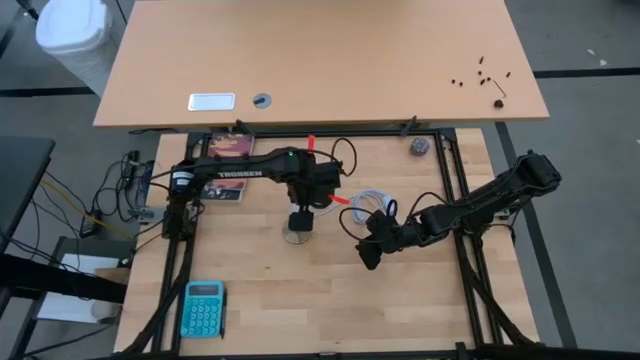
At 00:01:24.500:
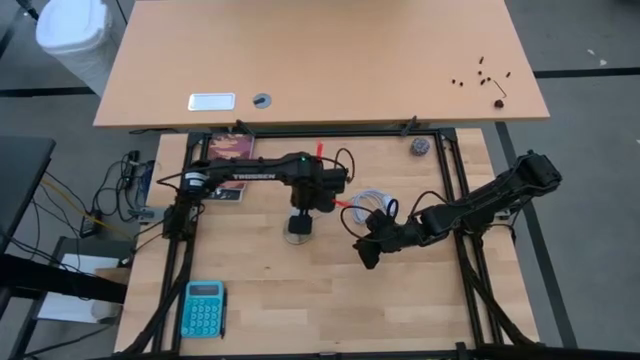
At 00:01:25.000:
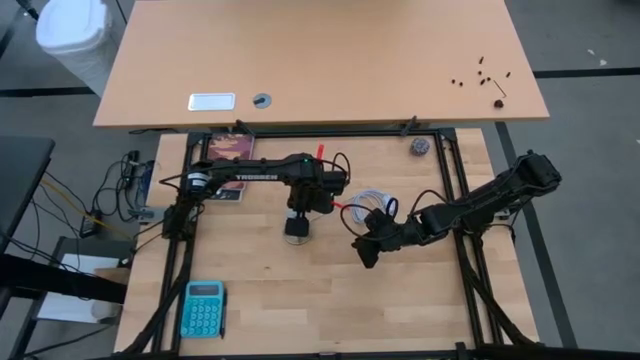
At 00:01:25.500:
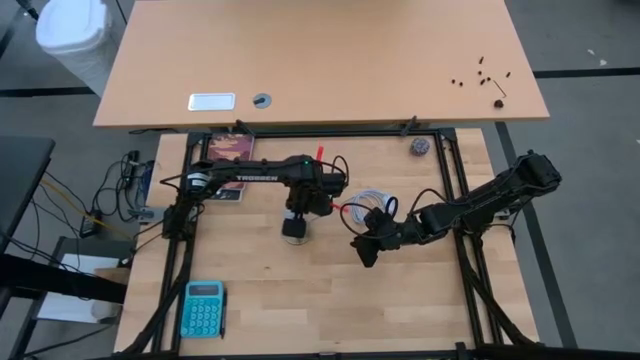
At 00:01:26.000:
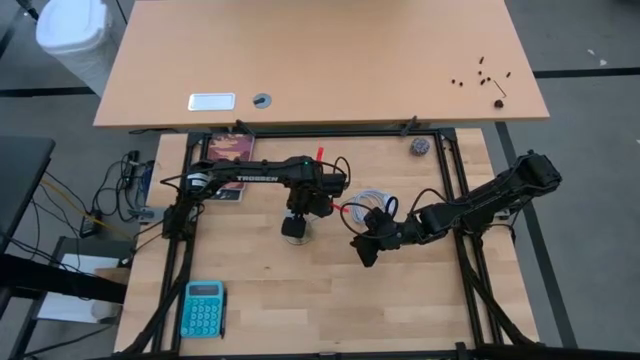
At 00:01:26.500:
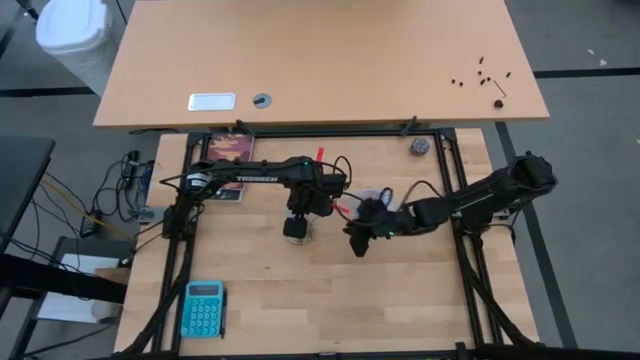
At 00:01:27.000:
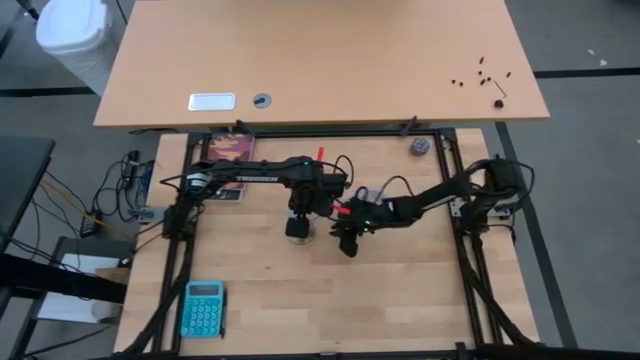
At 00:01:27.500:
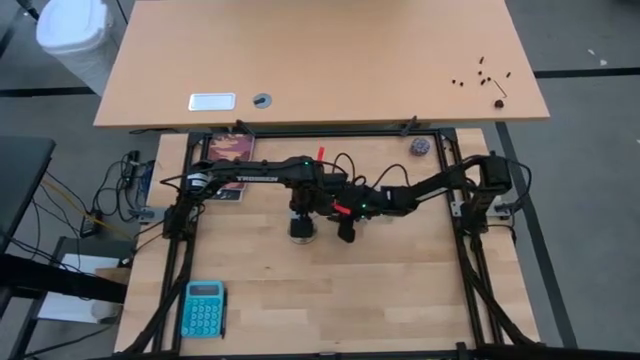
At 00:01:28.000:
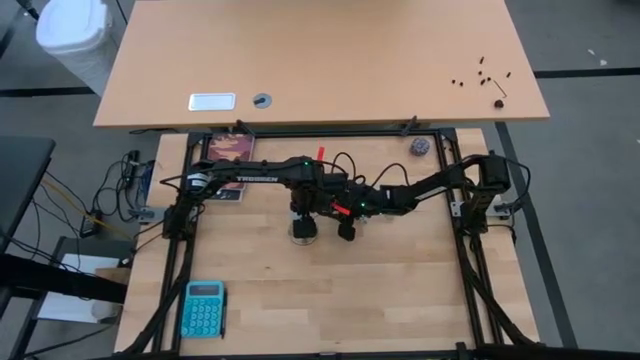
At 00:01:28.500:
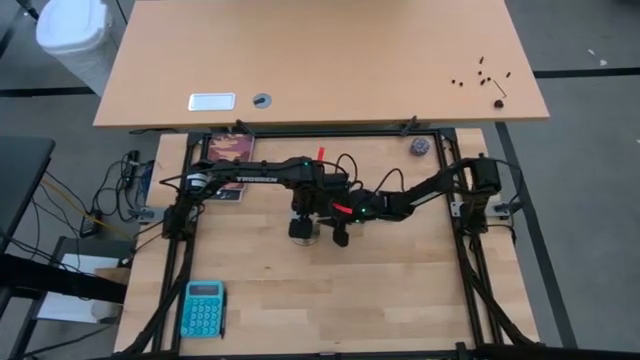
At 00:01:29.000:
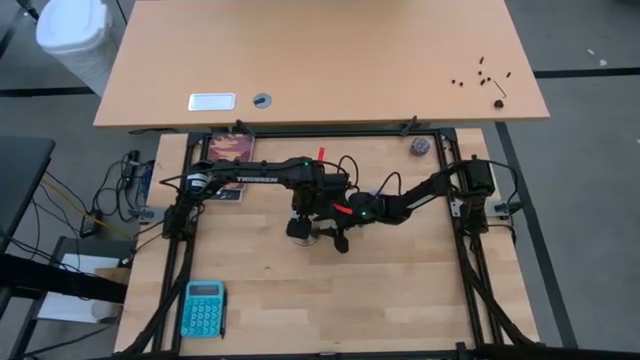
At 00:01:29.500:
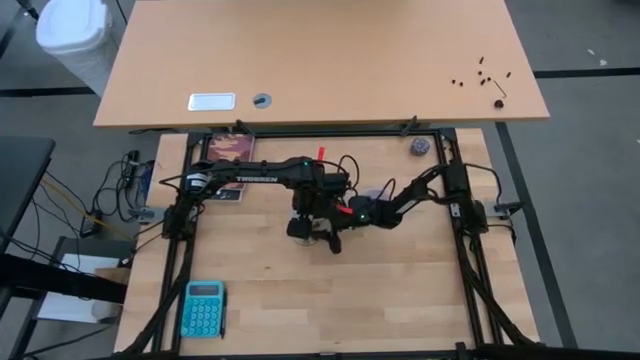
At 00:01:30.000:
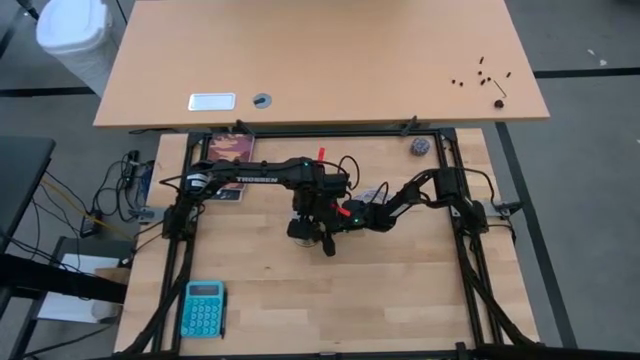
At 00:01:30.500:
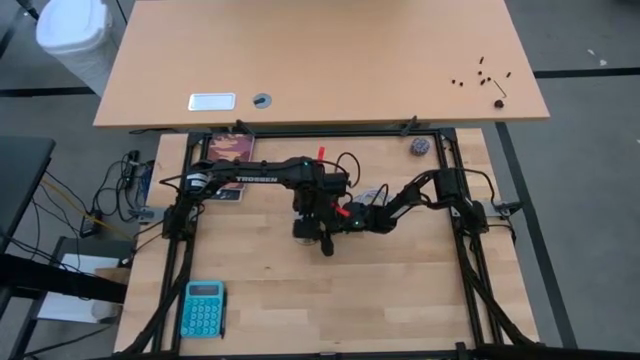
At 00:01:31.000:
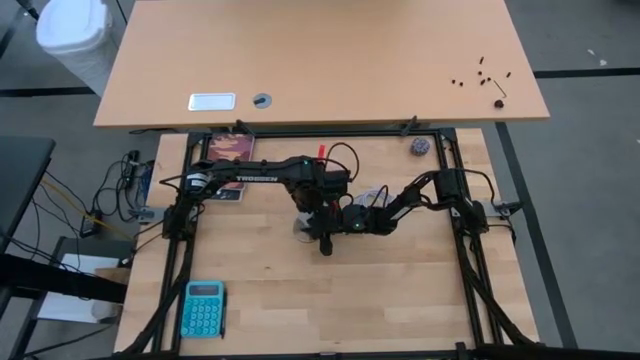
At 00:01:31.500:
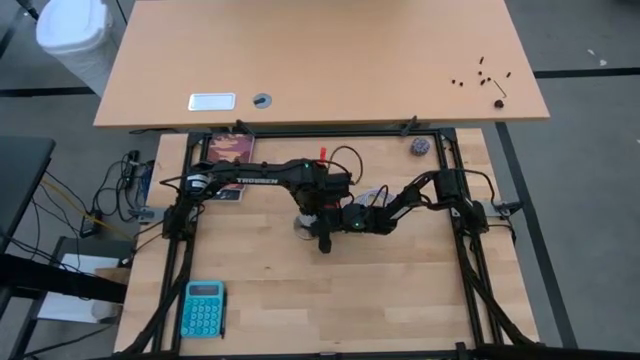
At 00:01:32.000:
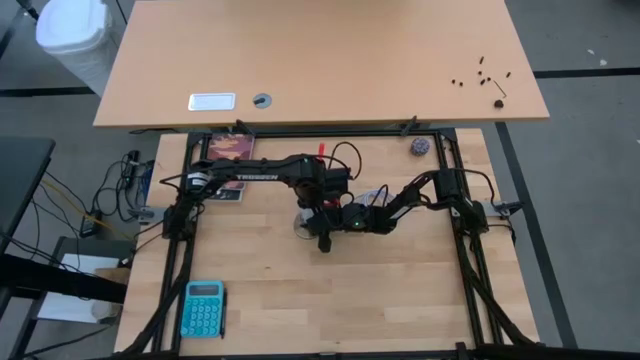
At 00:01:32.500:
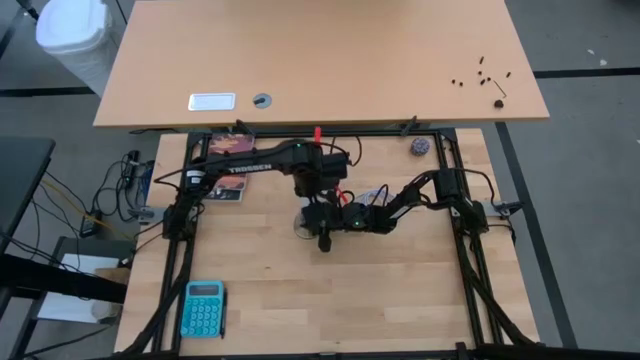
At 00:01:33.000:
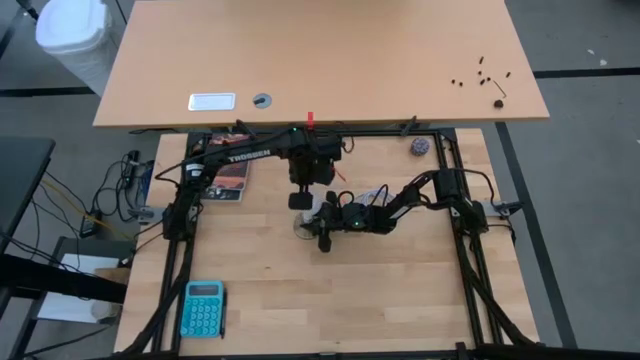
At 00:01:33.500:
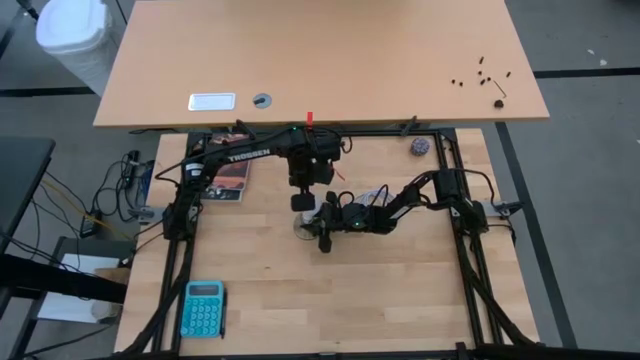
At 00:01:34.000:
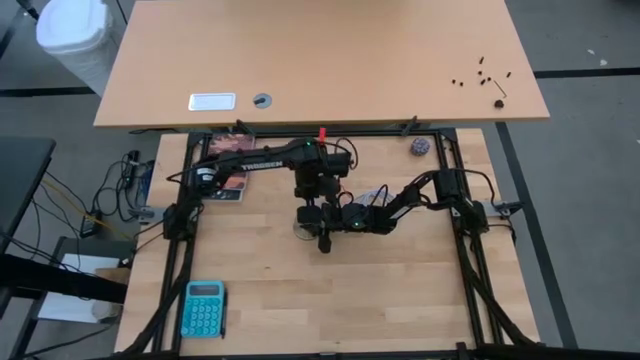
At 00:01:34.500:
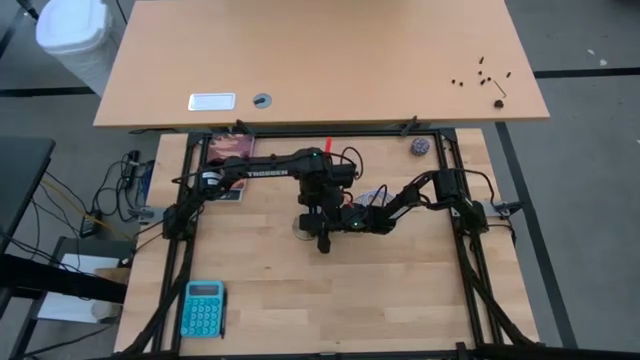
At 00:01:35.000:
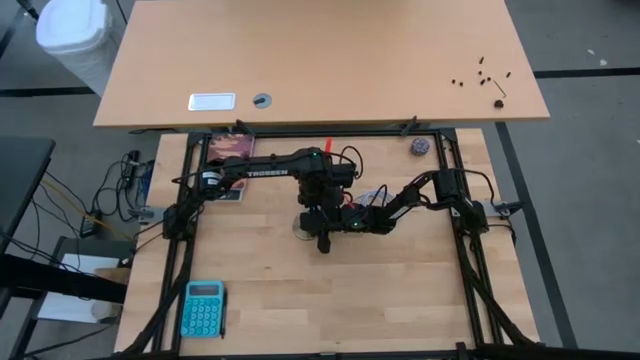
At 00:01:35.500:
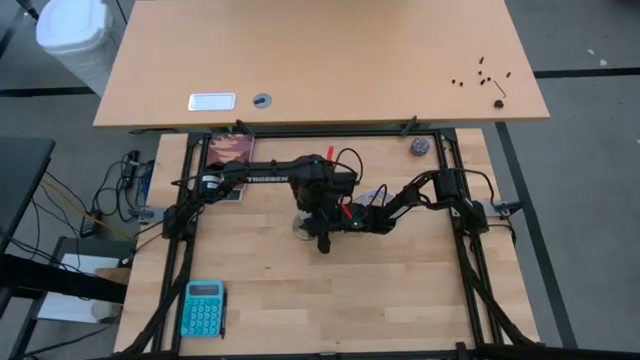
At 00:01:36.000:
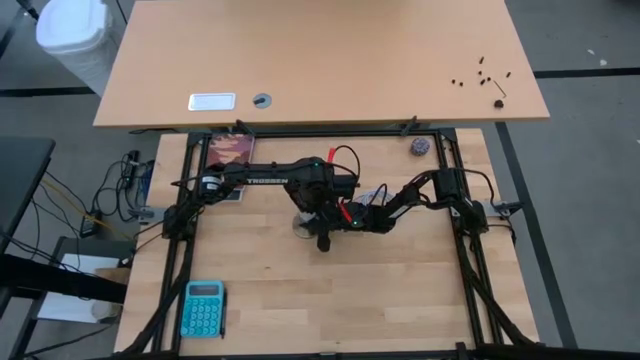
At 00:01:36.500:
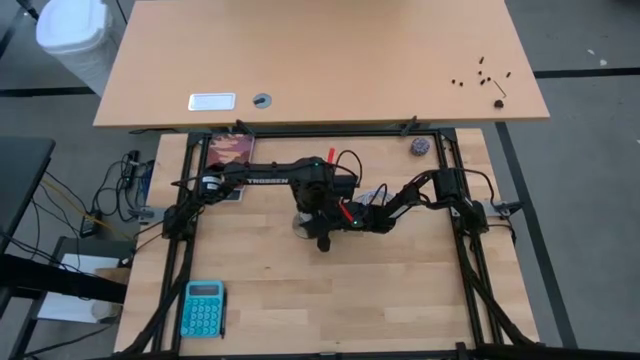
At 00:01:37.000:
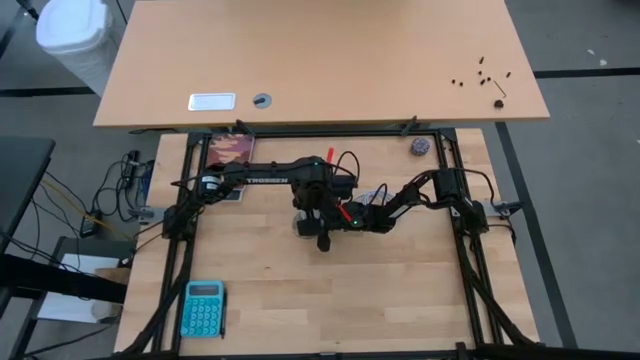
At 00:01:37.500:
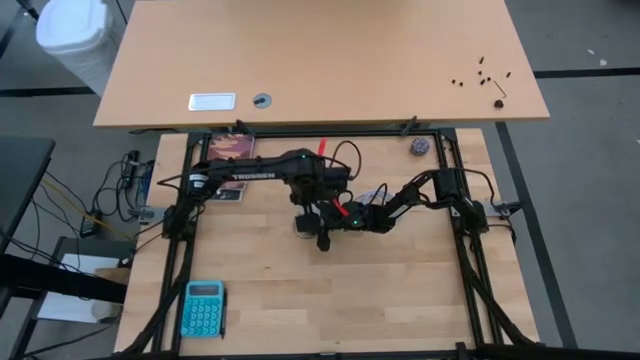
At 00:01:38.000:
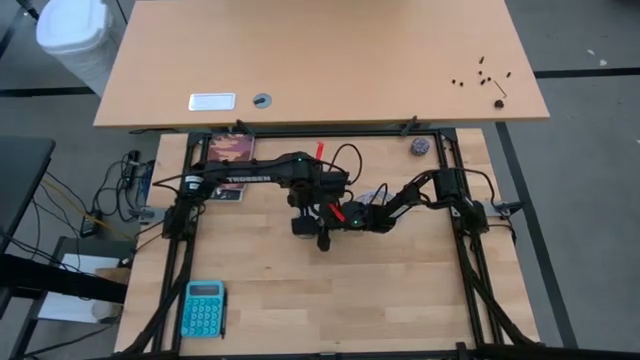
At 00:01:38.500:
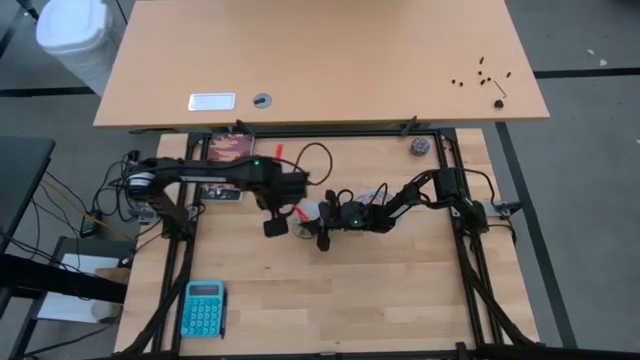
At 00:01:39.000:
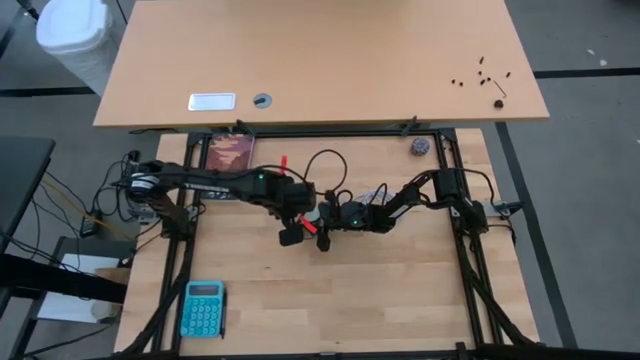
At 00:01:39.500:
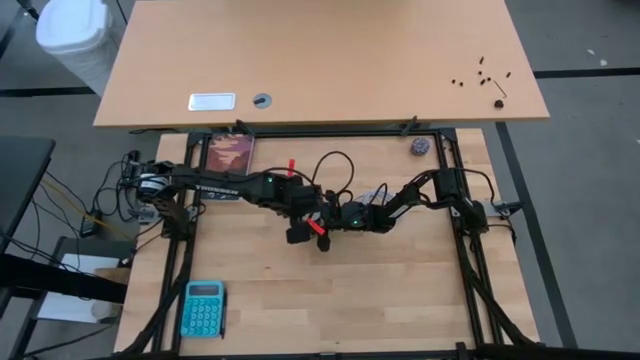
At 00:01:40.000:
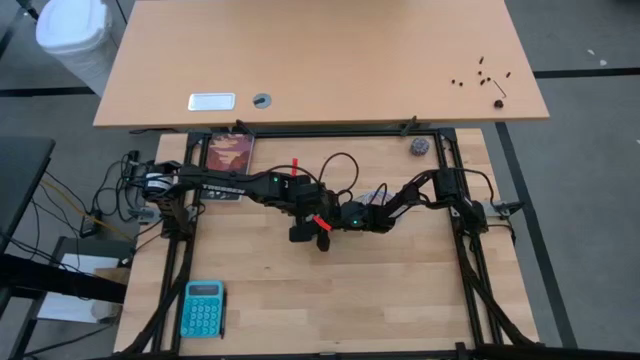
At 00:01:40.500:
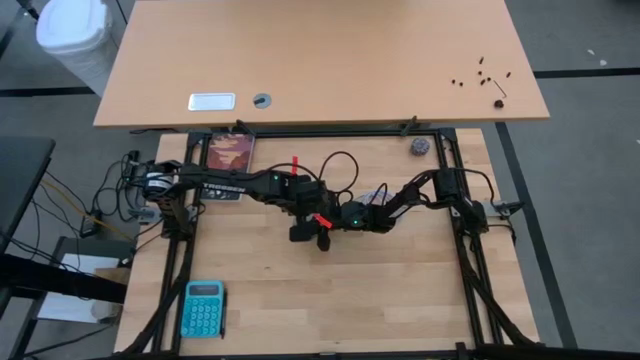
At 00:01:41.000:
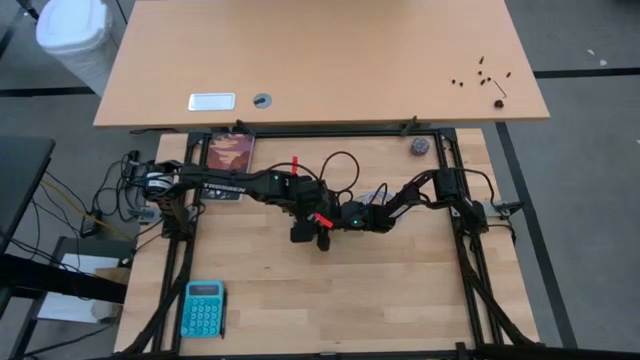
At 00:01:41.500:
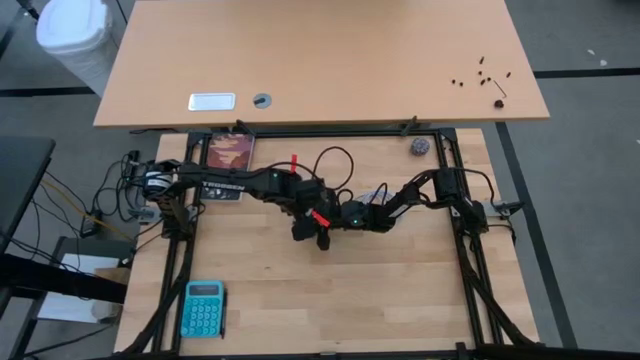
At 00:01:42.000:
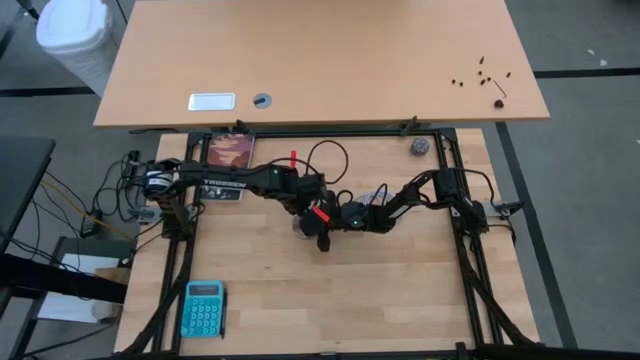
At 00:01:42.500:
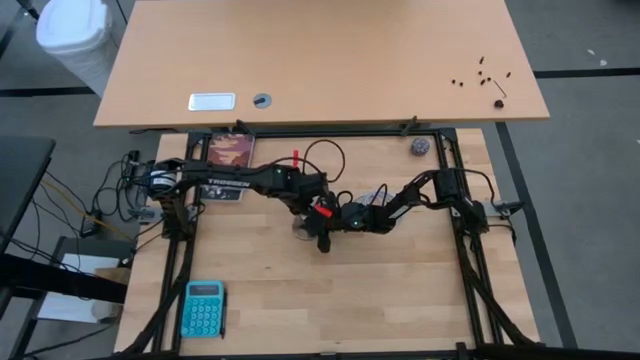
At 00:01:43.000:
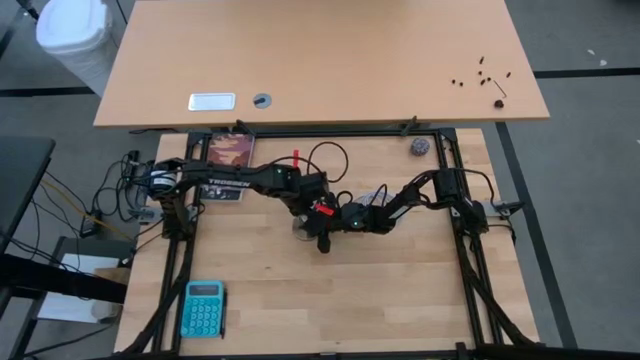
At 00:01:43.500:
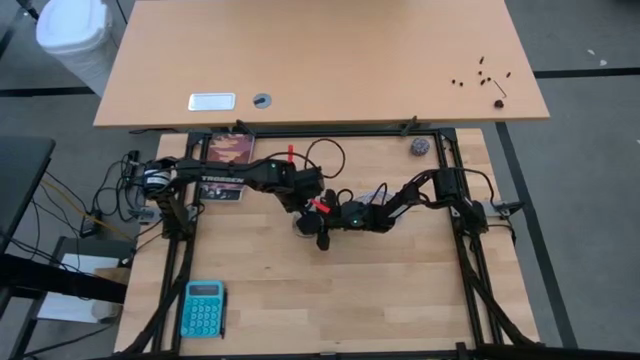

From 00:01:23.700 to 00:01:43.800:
Task: Screw lightbulb
Insert the lightbulb into the desk lamp

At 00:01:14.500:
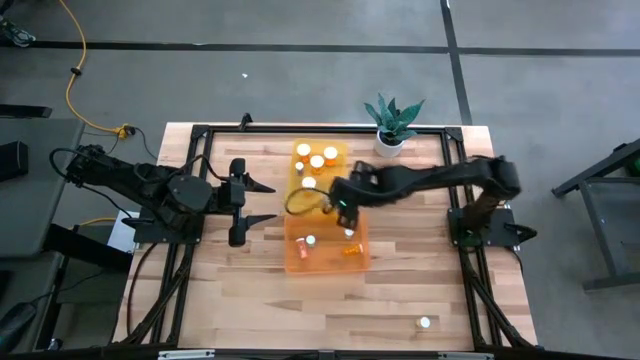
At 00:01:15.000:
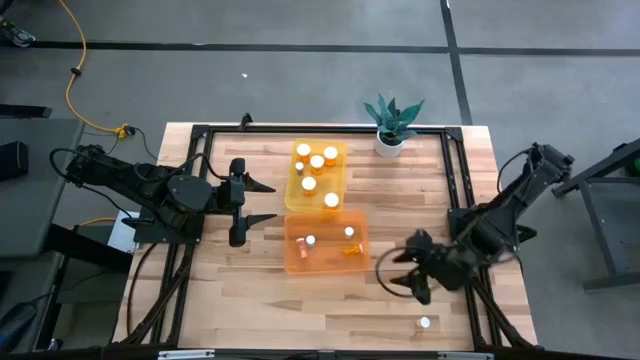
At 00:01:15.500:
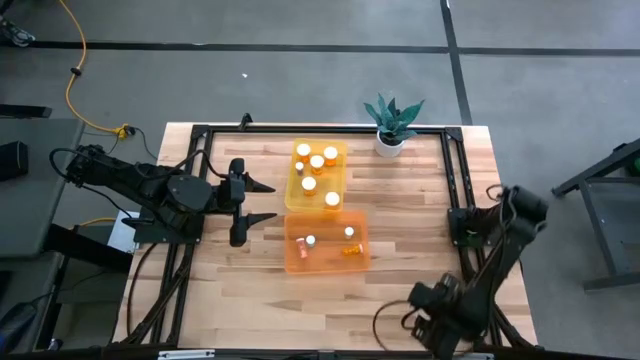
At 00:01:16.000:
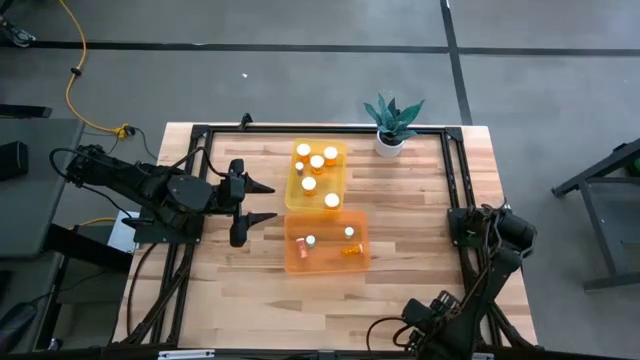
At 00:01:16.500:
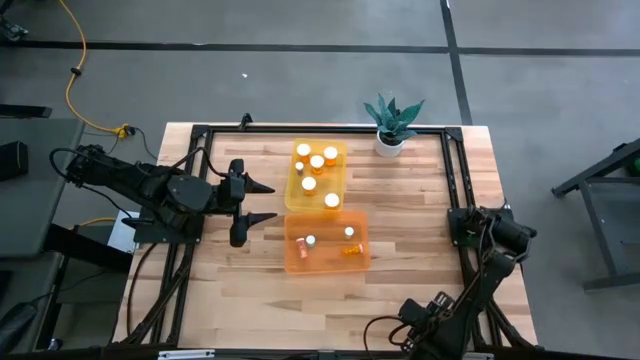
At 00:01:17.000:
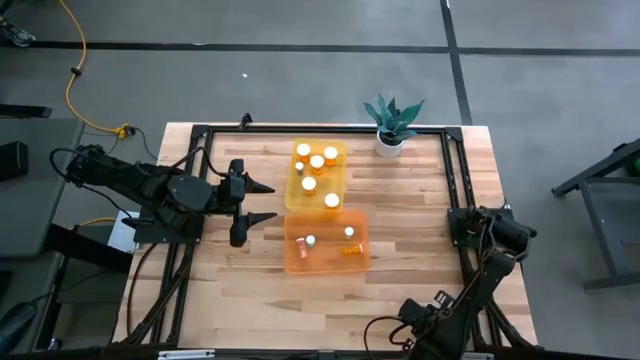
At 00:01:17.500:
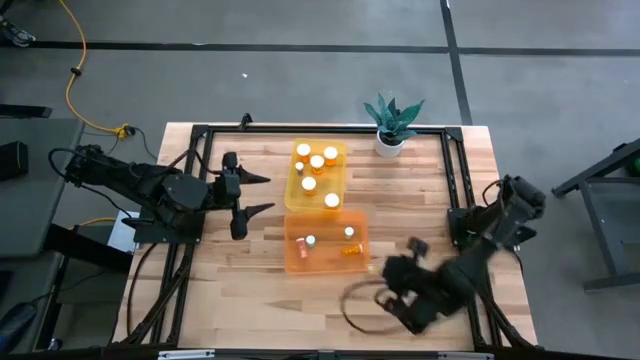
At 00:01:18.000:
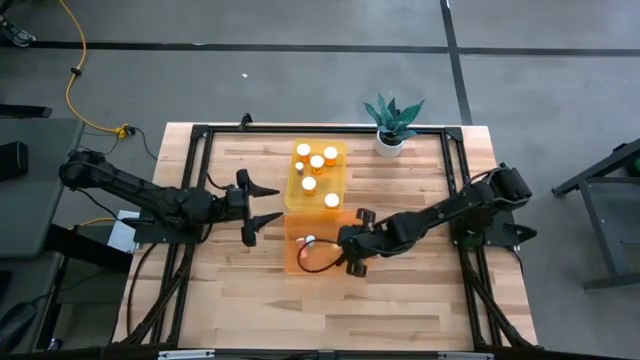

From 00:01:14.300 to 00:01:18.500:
Task: Pick and place medicine bottles into bin by pill shape (circle, oval)
Put the yellow tablet bottle into the orange bin
